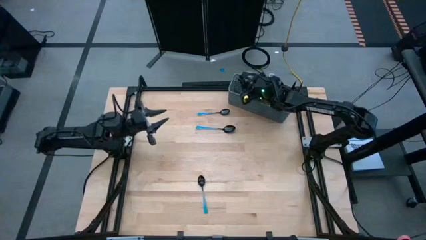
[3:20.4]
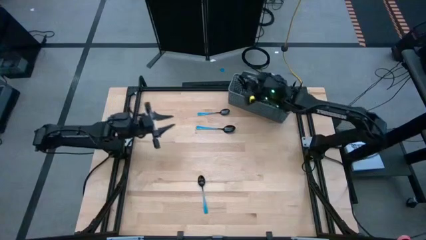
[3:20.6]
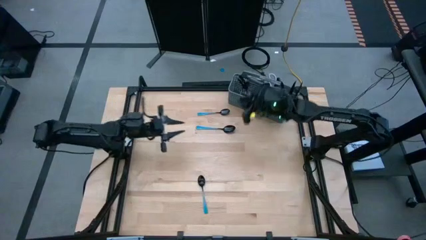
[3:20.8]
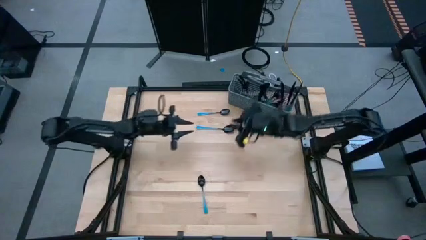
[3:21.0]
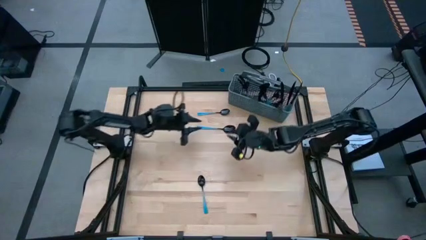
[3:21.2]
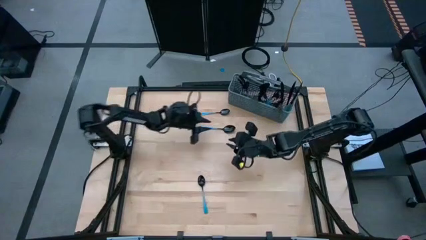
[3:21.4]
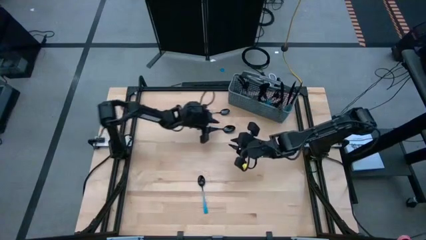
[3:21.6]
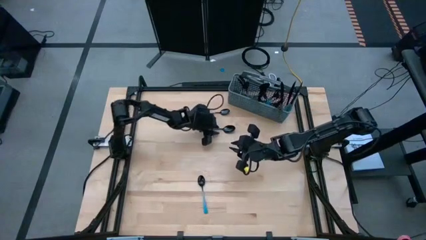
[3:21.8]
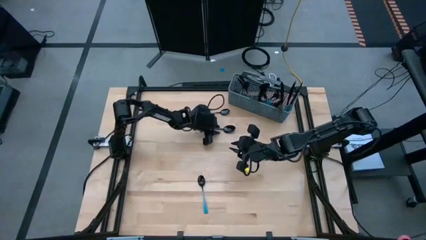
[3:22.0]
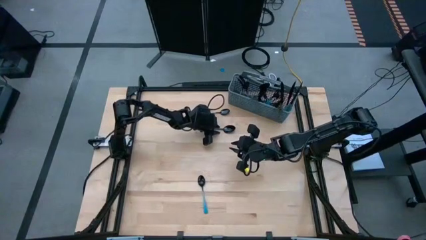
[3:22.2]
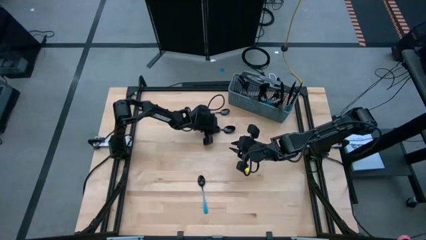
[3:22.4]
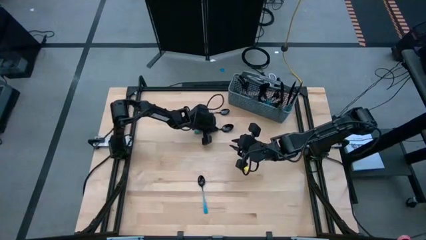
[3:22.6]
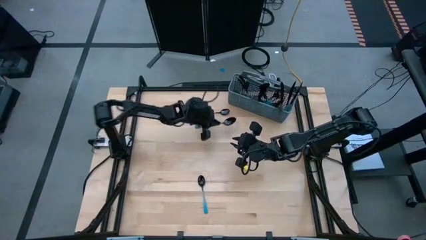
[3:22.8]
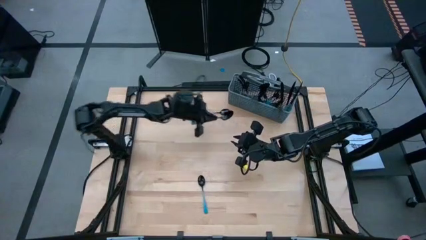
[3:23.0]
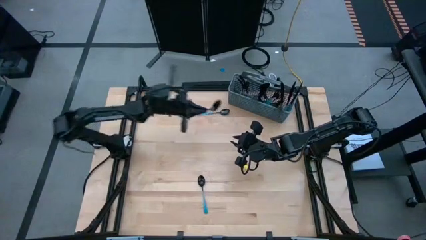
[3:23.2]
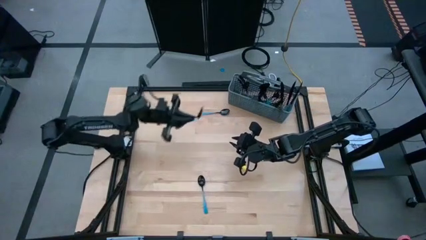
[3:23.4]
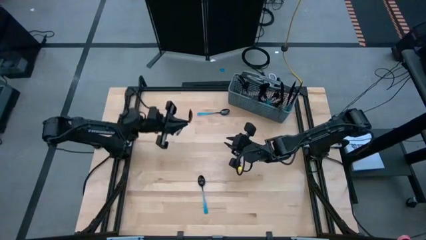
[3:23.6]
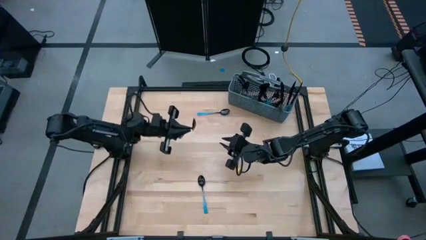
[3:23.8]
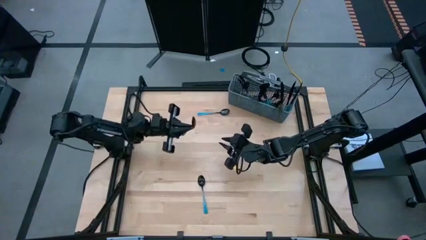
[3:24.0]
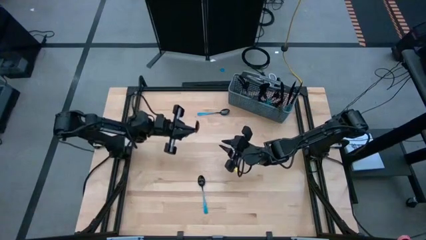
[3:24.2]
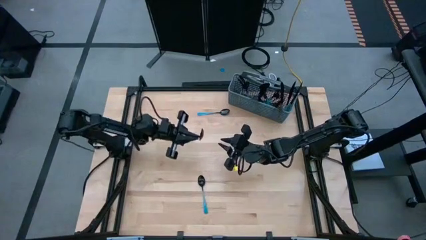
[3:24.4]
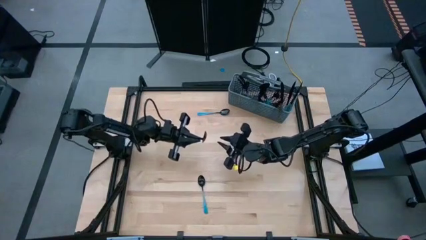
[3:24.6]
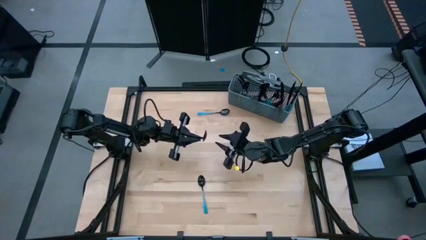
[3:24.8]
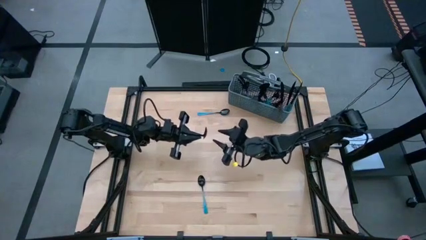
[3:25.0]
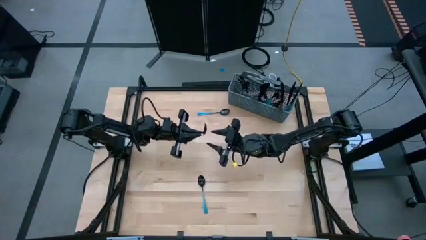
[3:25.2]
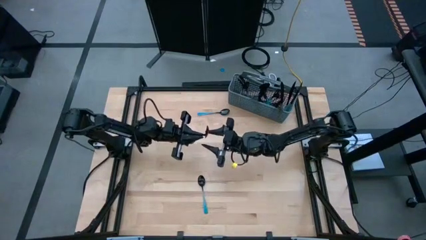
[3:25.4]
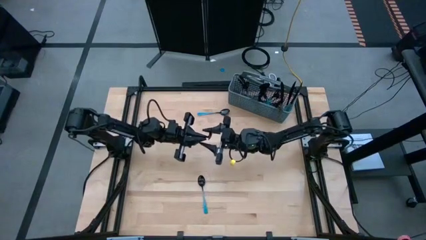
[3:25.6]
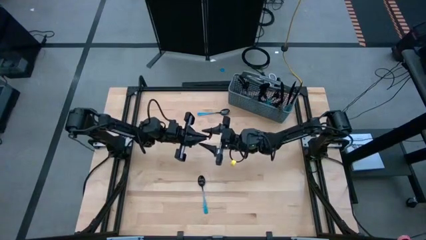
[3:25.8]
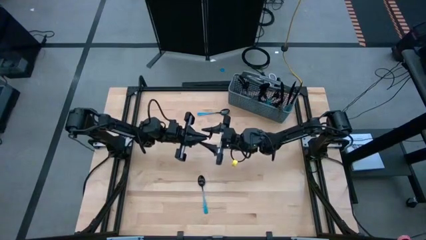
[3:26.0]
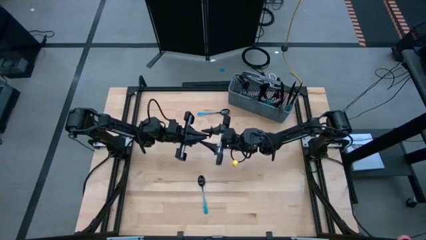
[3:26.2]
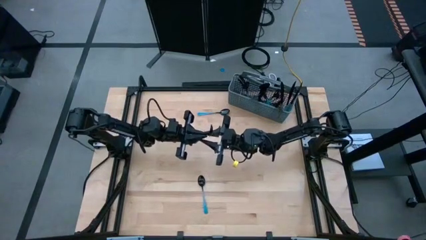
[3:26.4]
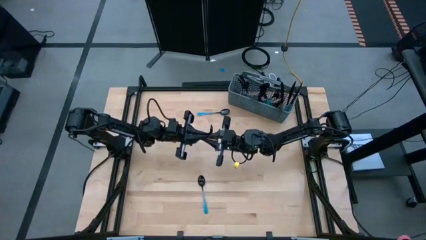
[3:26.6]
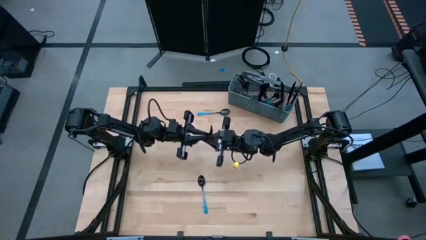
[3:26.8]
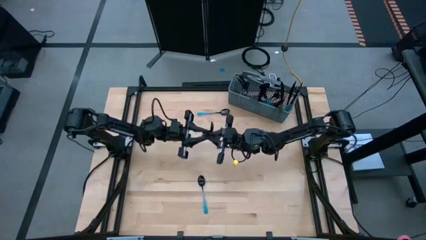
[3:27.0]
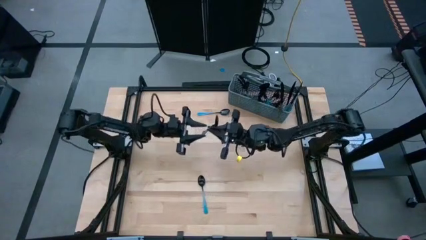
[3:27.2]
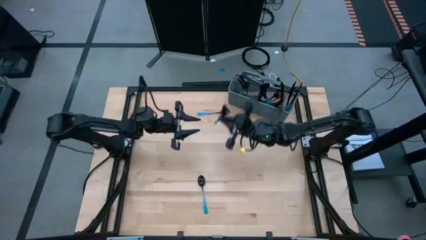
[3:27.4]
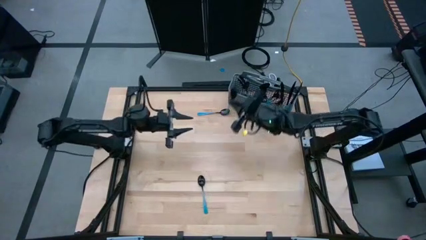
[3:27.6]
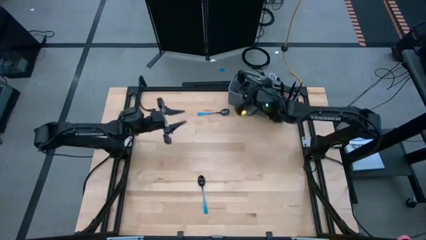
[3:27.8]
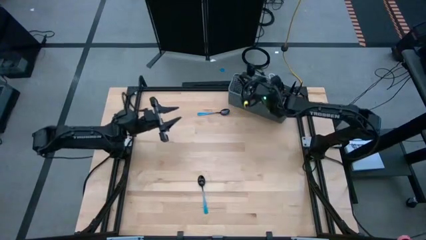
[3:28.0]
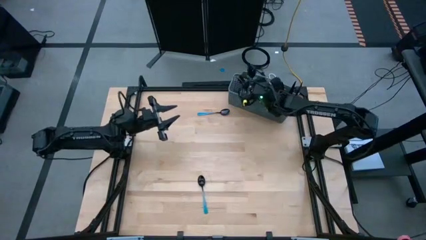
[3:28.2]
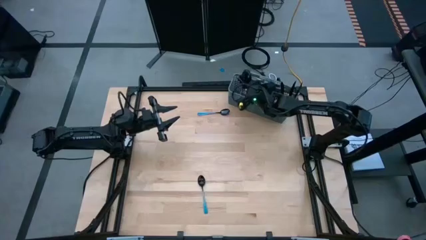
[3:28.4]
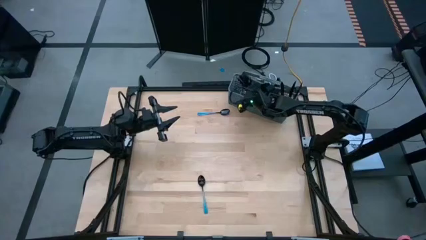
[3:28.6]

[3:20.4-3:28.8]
Task: Sort silverware
Put the blue spoon into the left of the blue utensil organizer

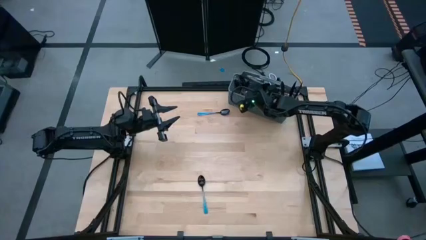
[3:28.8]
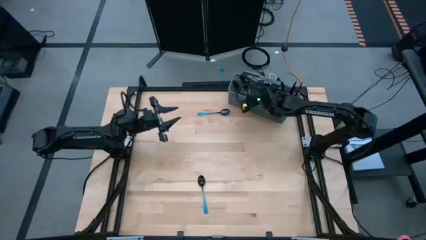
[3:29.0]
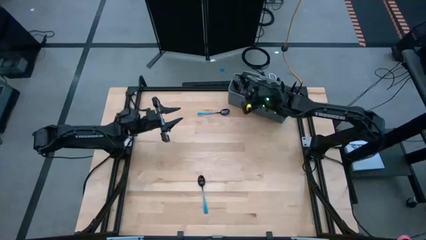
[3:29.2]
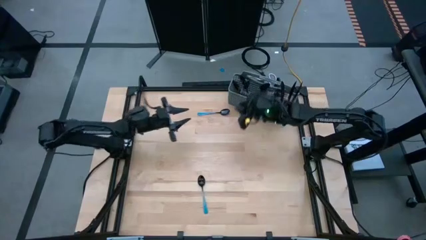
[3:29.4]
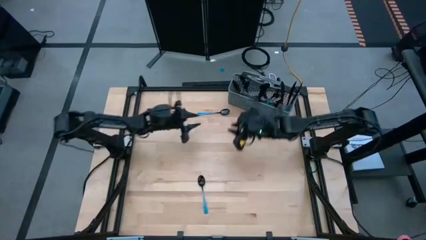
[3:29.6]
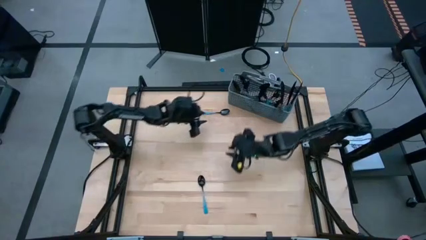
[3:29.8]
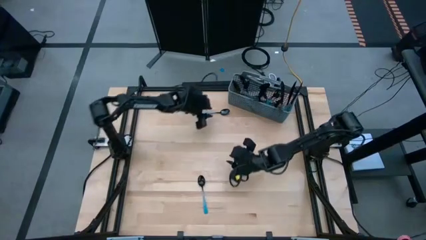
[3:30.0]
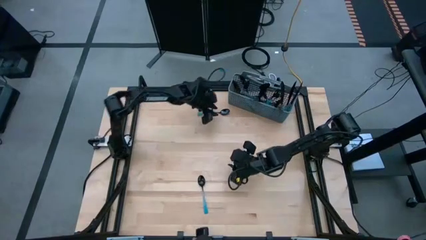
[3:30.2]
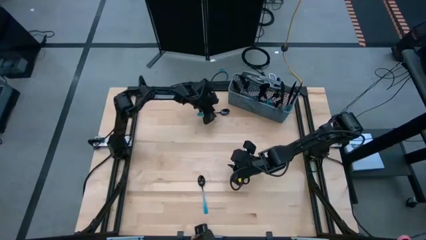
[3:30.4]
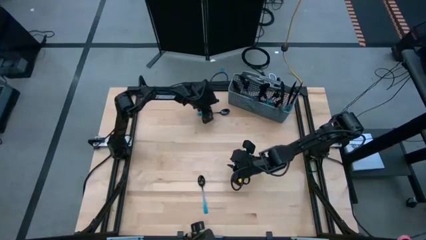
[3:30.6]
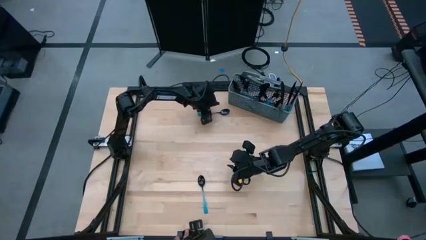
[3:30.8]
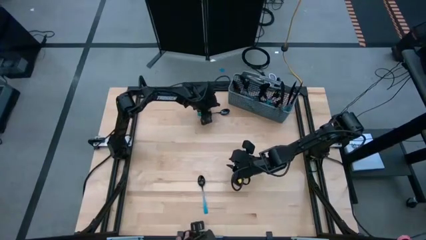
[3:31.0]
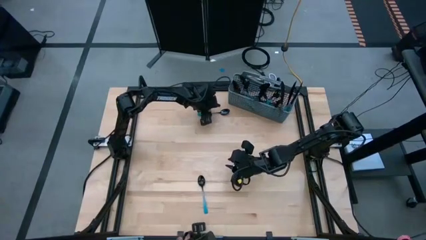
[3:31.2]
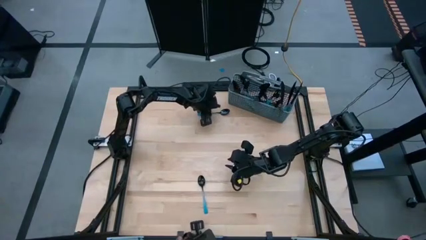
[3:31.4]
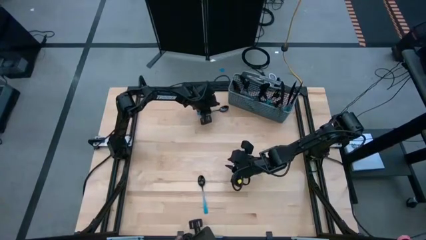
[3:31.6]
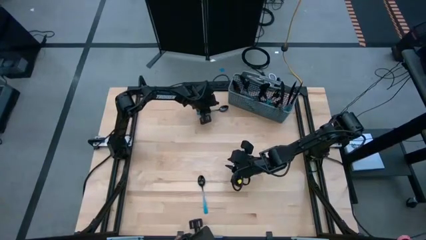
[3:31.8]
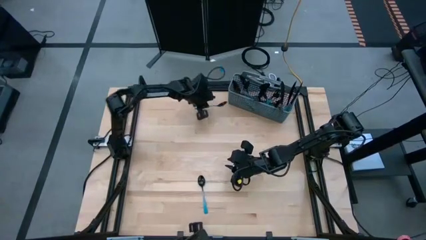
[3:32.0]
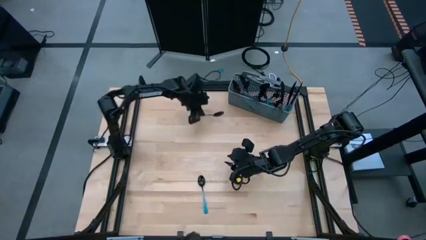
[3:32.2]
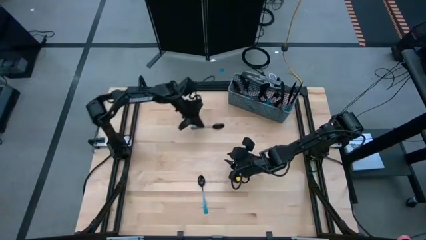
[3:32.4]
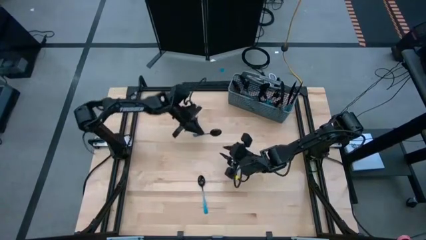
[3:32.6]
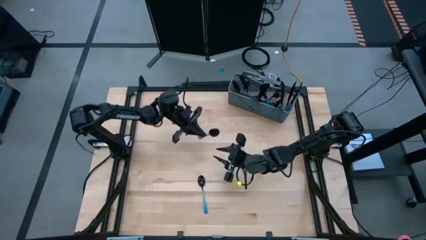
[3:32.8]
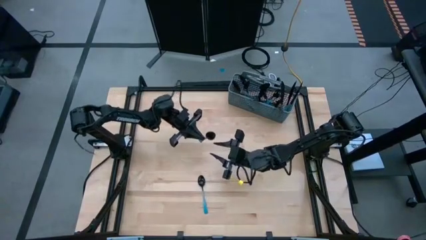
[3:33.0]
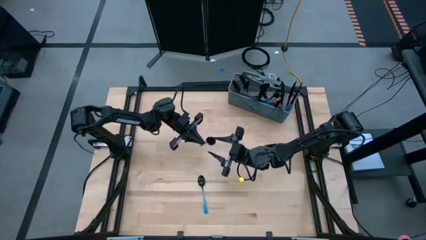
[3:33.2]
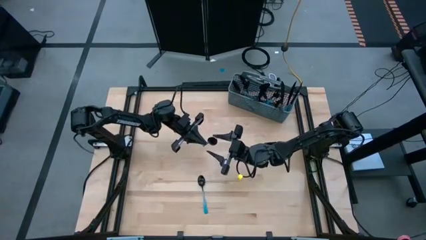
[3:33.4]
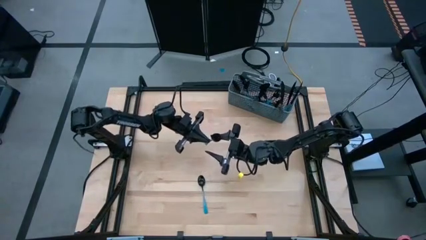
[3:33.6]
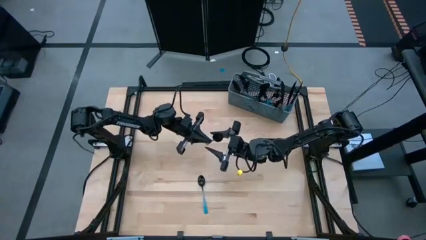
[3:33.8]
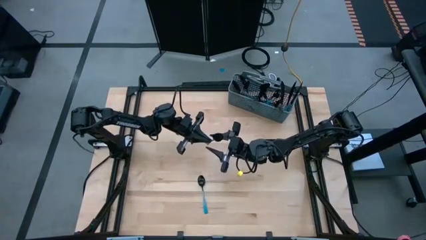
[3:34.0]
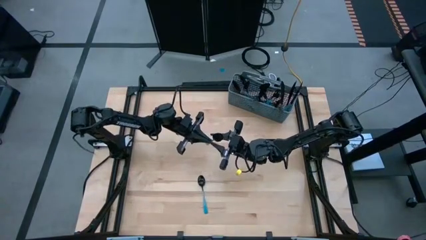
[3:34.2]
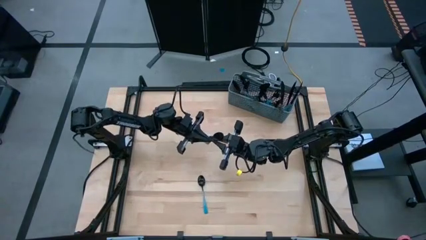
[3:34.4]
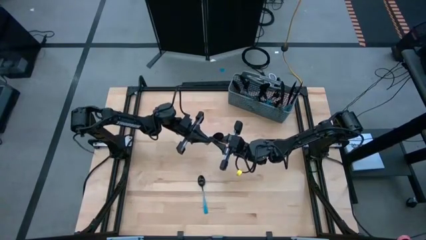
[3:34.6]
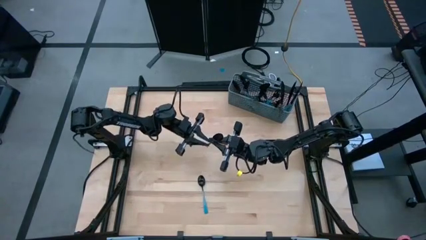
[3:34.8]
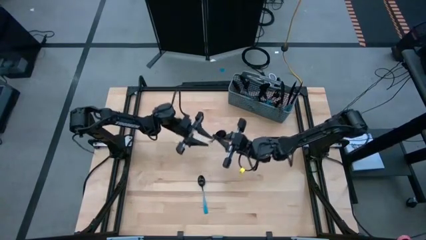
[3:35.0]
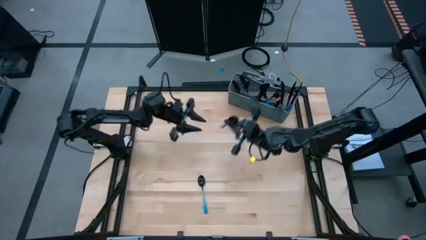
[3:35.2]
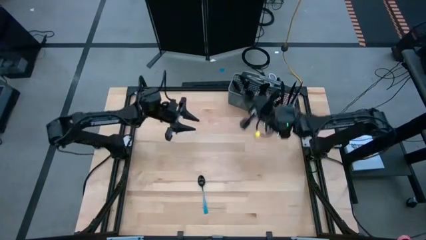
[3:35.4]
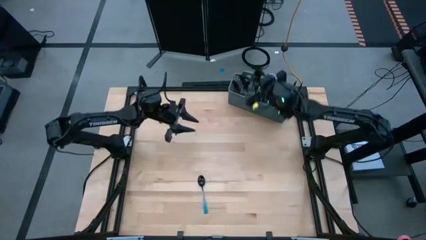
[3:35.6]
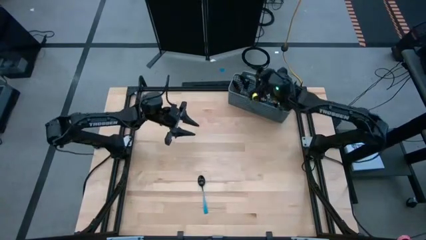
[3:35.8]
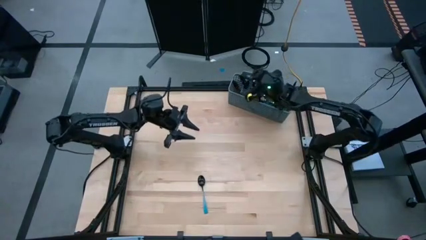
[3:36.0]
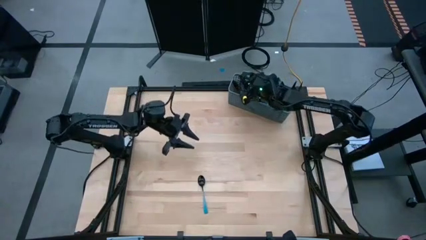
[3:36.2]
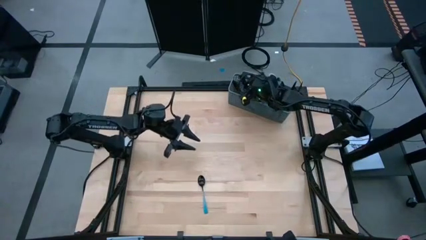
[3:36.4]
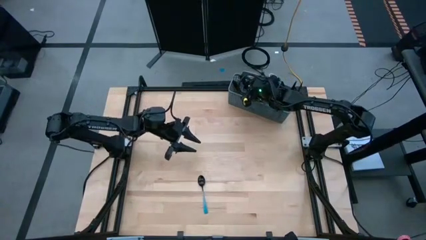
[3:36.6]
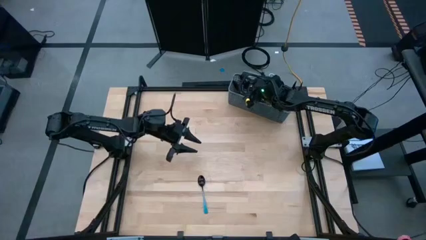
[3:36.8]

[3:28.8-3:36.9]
Put the blue spoon into the left of the blue utensil organizer
